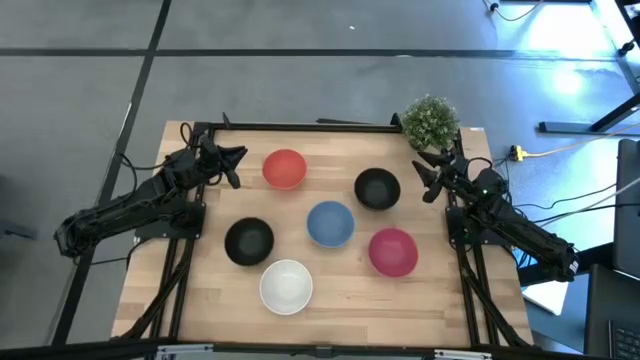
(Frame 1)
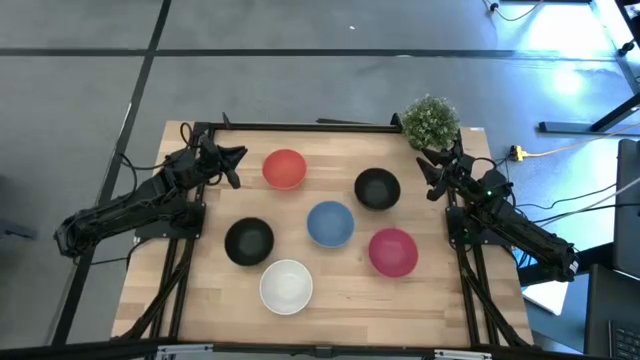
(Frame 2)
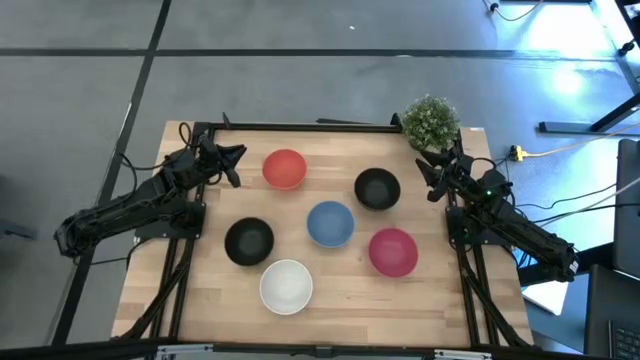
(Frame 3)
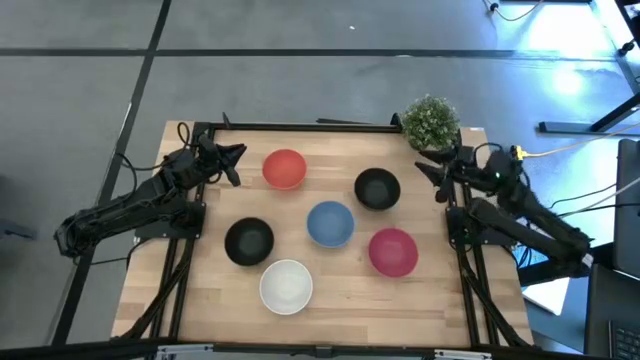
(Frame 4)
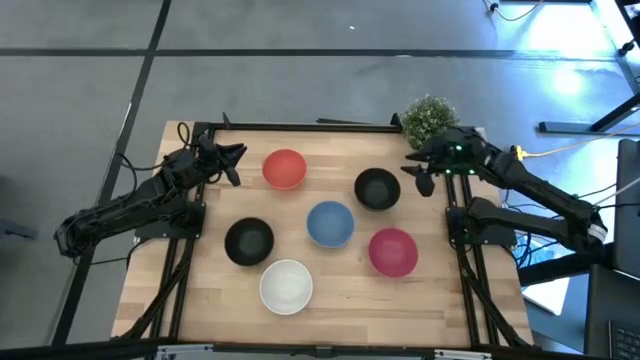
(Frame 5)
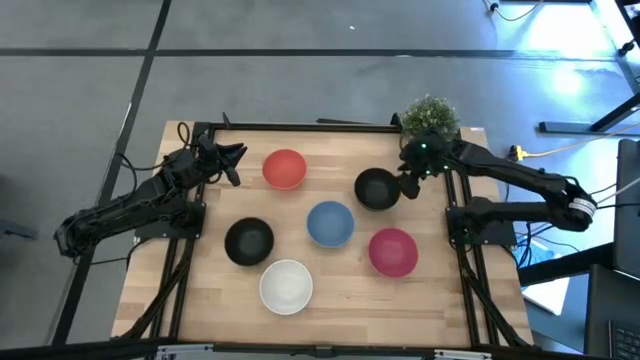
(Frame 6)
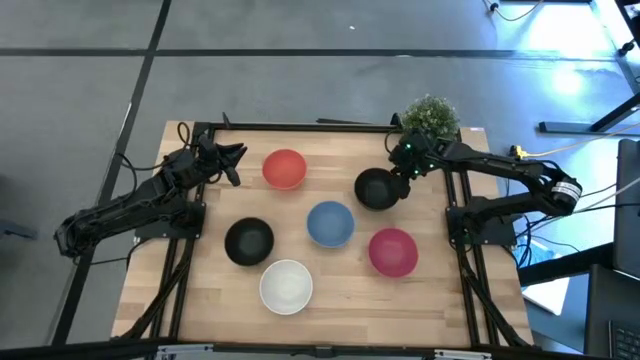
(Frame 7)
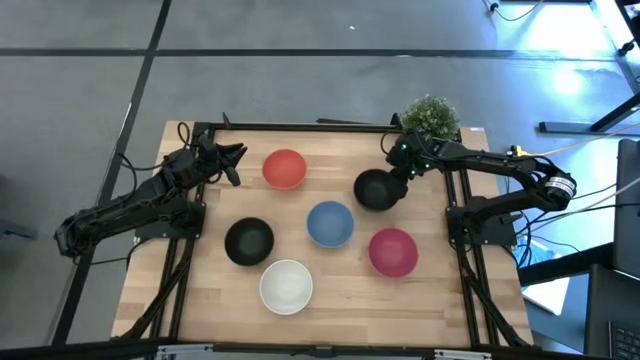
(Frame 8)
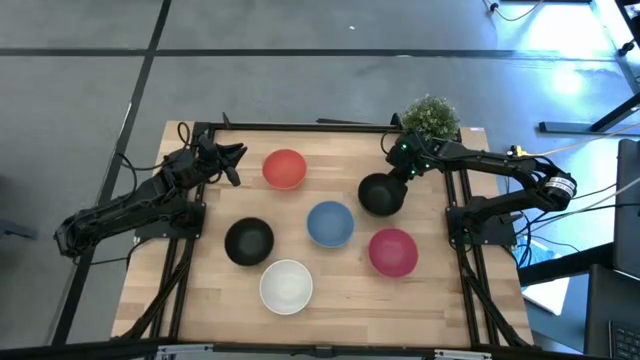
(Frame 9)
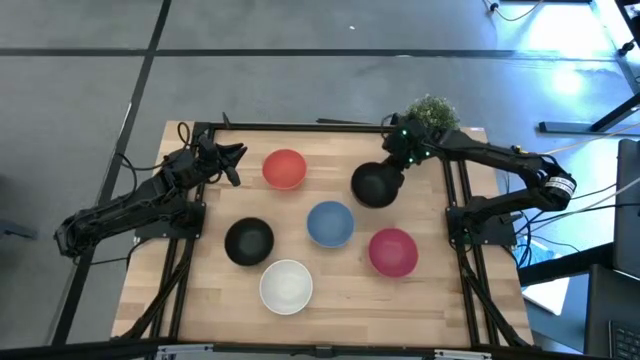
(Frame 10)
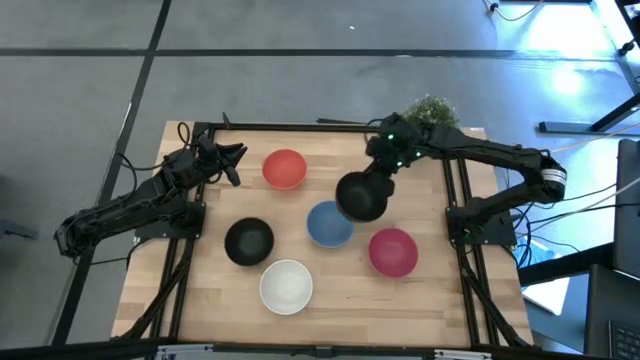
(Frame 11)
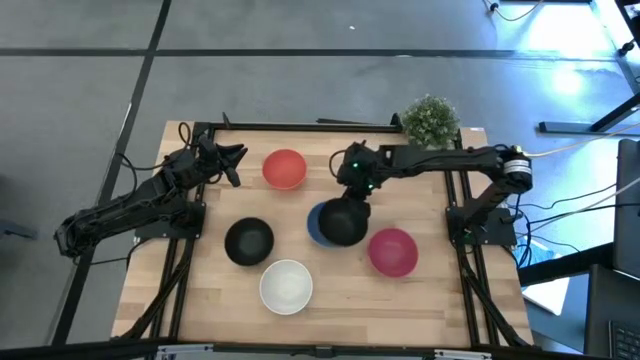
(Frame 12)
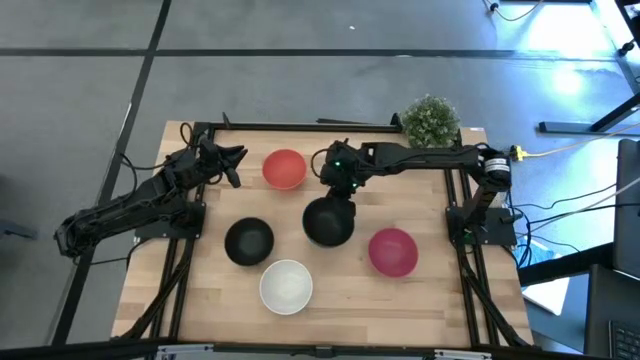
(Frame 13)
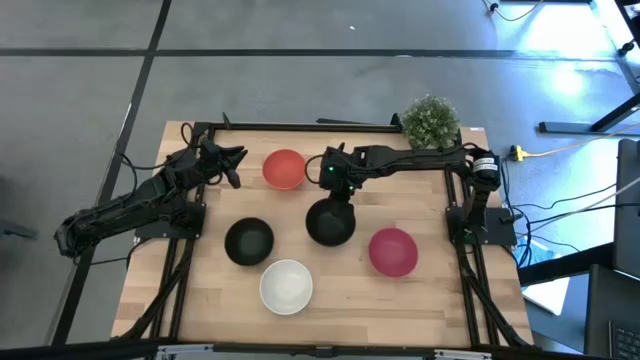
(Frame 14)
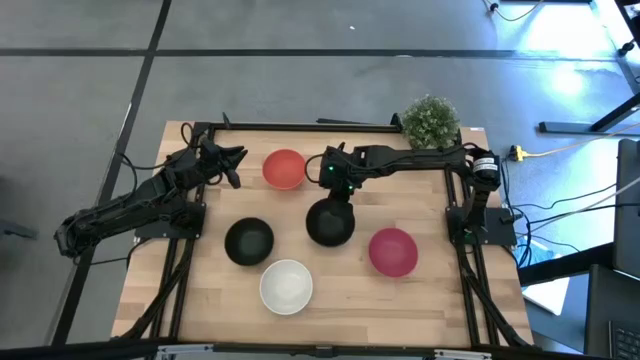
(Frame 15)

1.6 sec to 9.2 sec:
Task: Nest bowls inside each other
Stack the top black bowl on top of the blue bowl

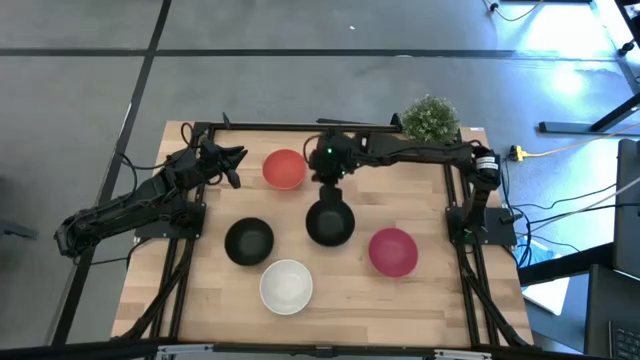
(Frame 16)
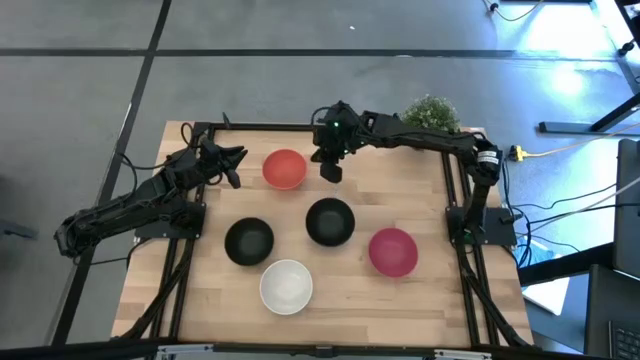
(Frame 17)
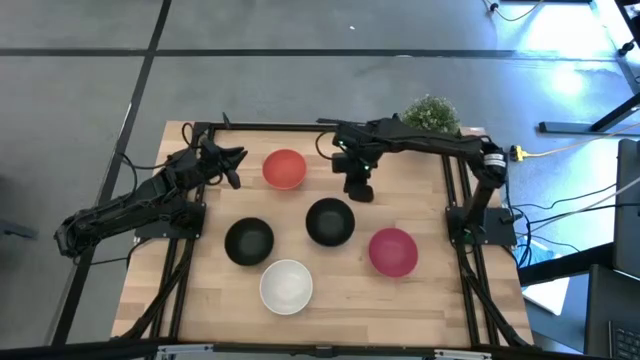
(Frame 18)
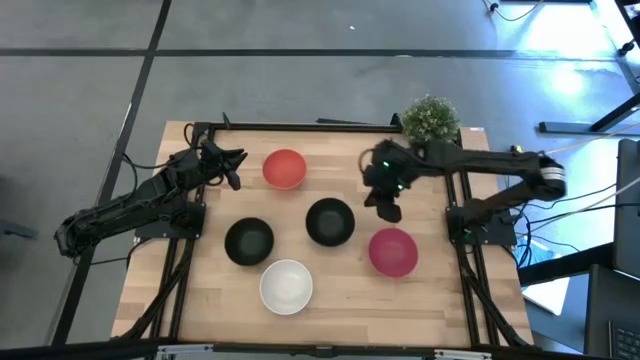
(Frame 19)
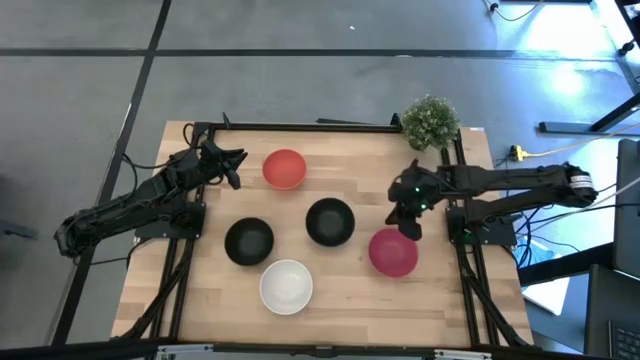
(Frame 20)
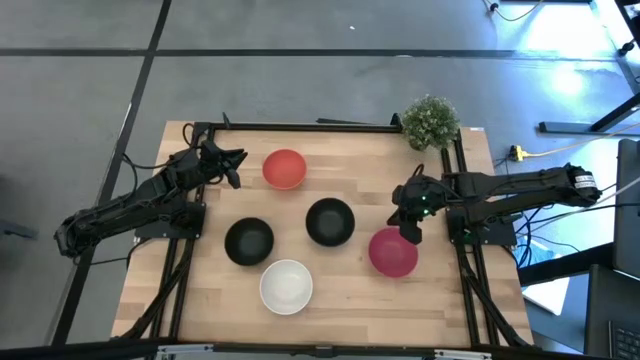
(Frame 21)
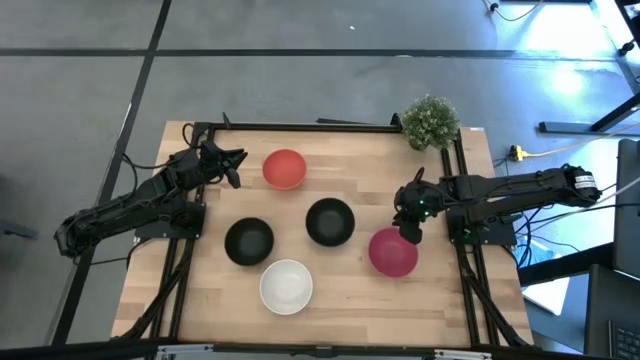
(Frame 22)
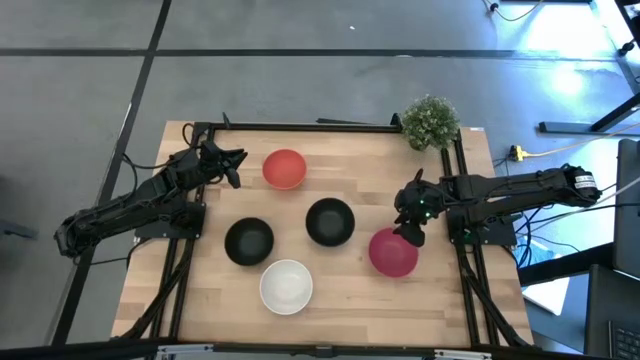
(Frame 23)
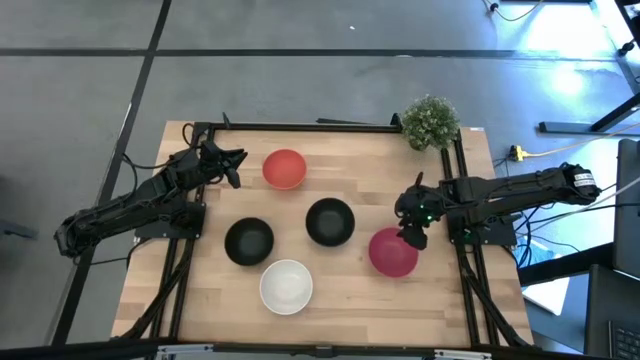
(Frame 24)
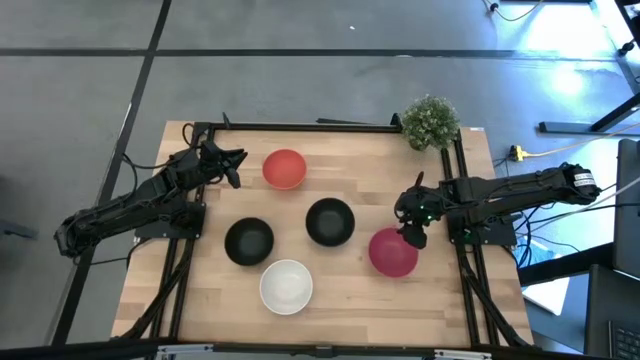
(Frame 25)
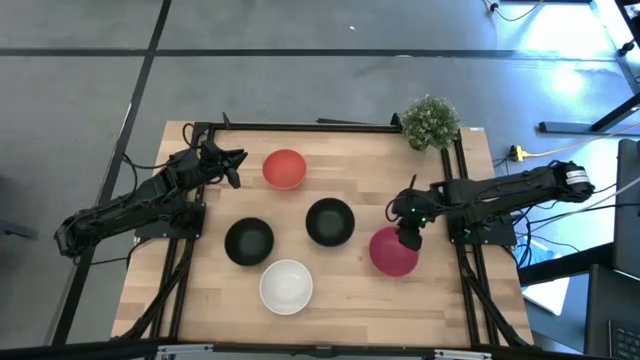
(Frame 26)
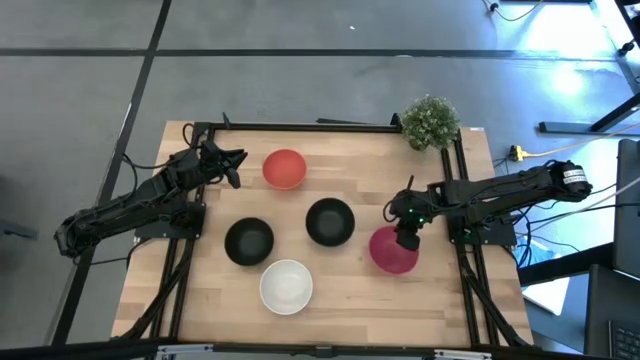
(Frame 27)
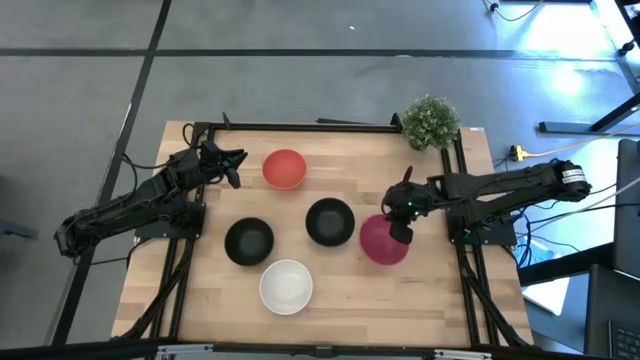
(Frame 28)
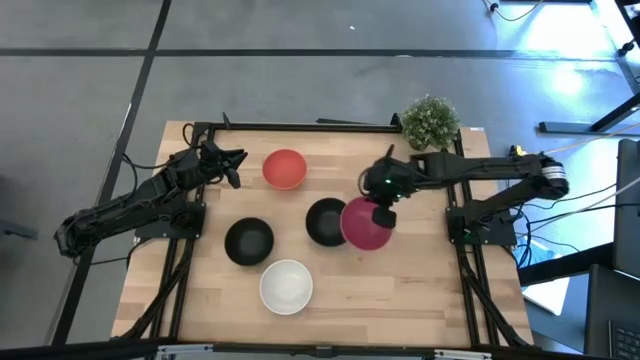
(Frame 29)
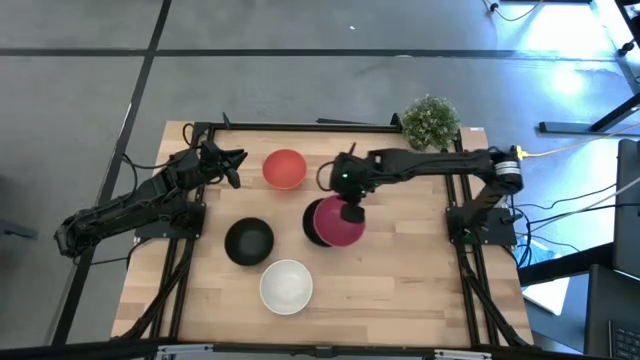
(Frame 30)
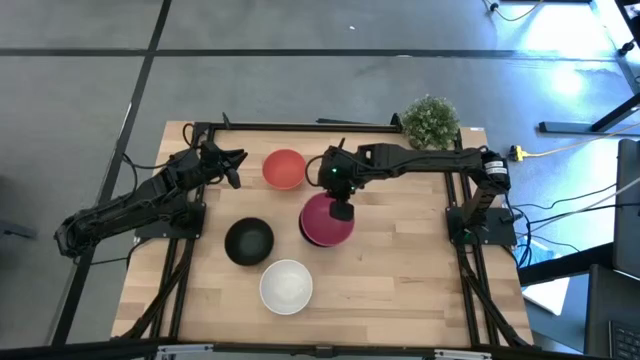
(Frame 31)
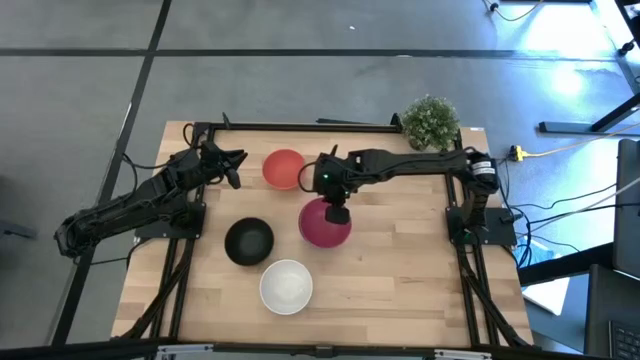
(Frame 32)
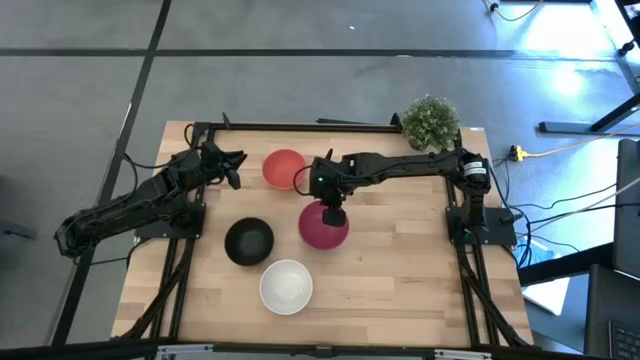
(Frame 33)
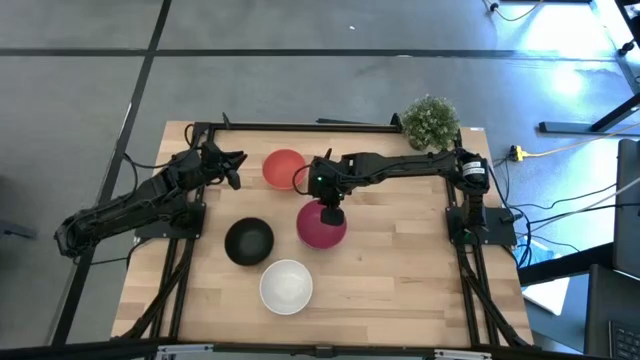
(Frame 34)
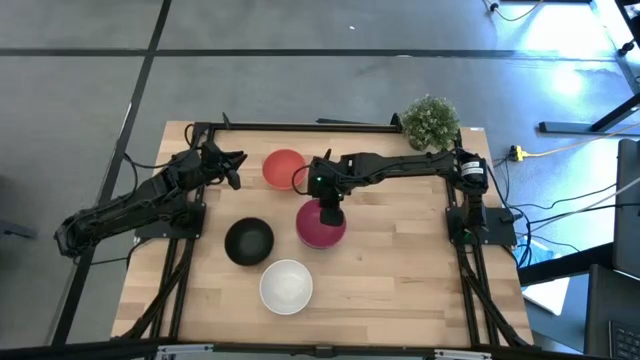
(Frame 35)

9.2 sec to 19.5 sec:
Stack the pink bowl on top of the black bowl

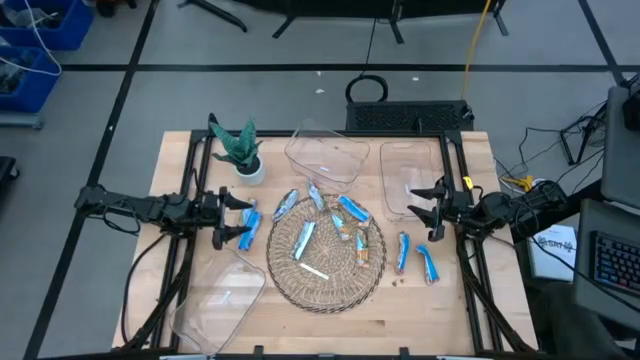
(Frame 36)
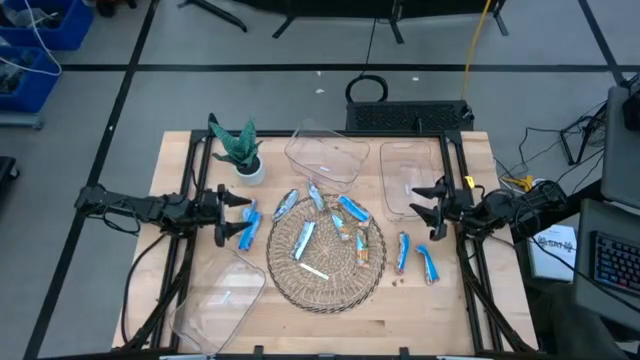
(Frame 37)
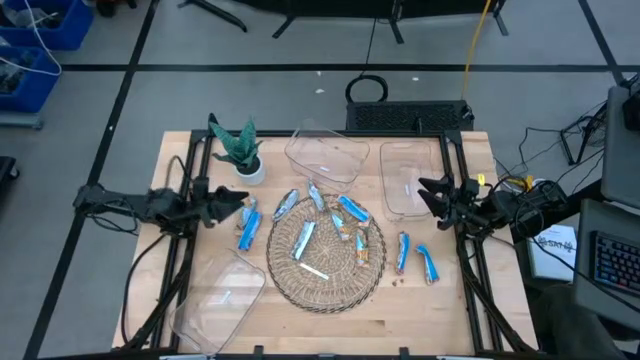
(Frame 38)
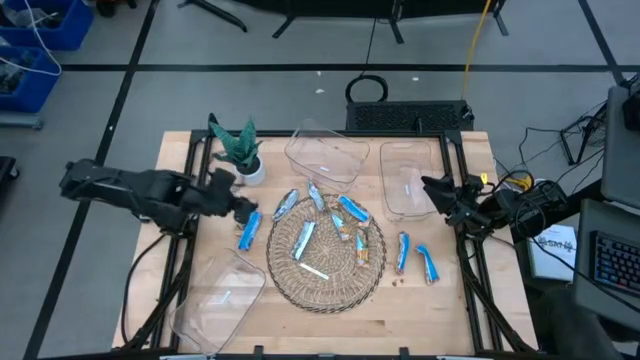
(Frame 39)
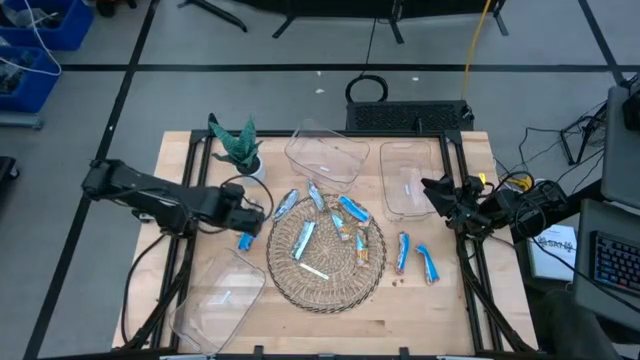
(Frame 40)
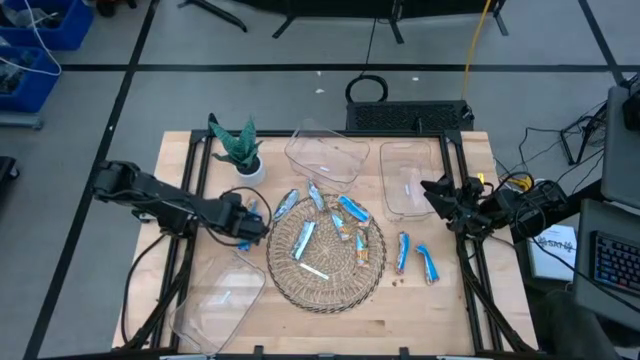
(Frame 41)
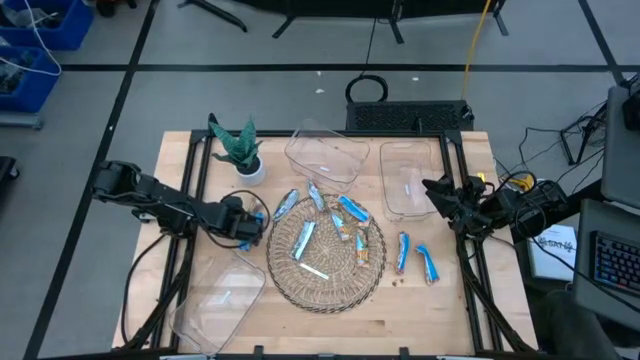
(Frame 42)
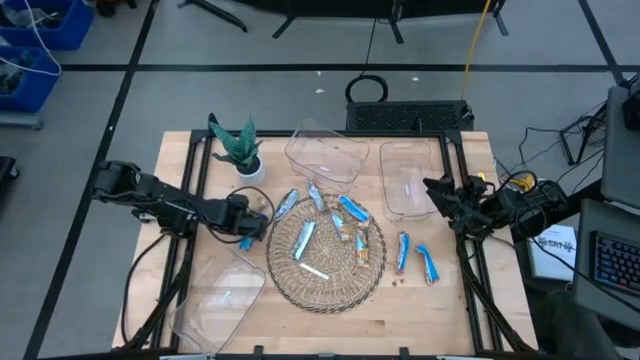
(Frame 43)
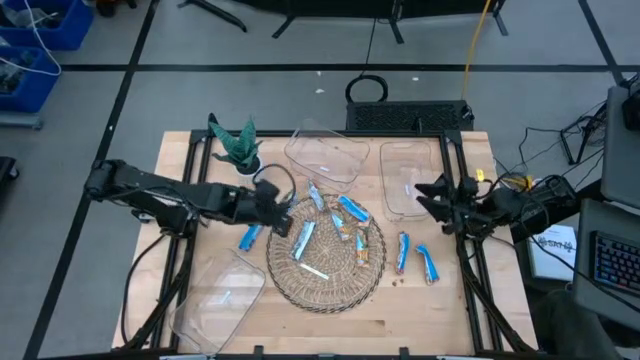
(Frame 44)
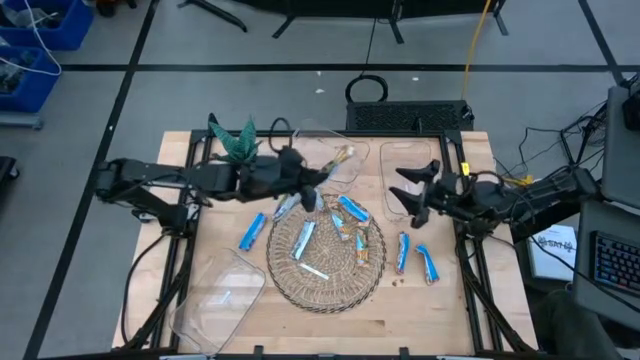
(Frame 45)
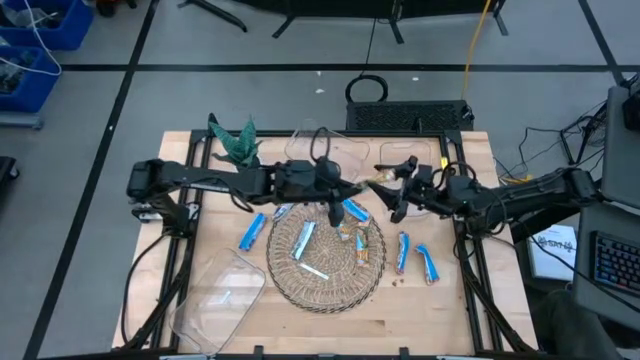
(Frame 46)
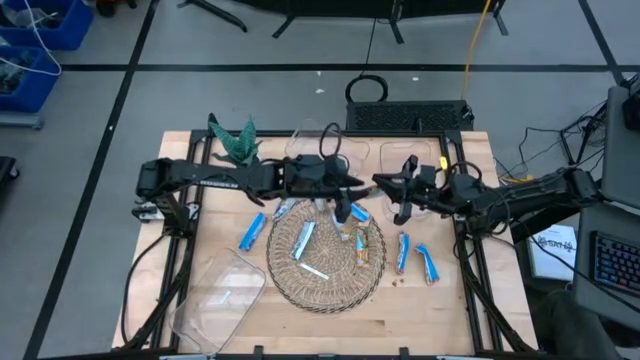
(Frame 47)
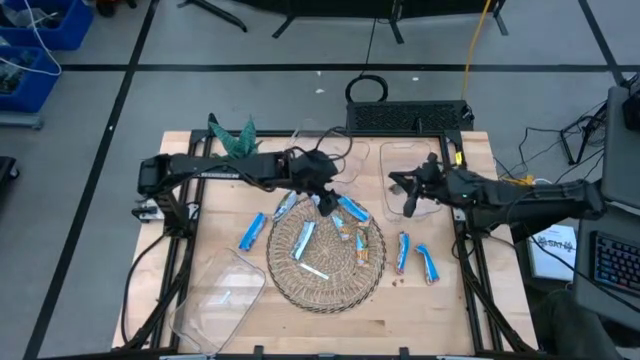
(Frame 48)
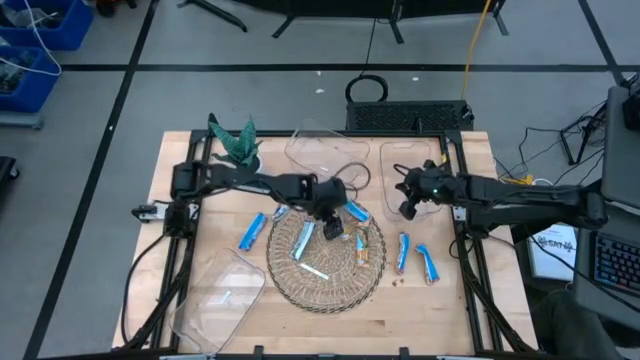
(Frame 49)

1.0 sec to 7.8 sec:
Task: Pick and place Granola Bars by type
Put the top left yellow granola bar into the top right transparent bin
